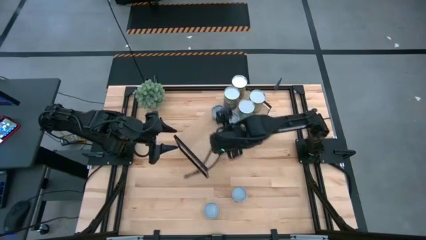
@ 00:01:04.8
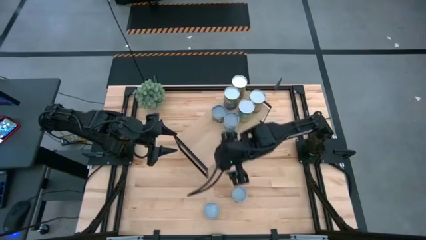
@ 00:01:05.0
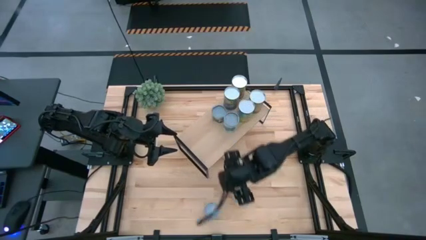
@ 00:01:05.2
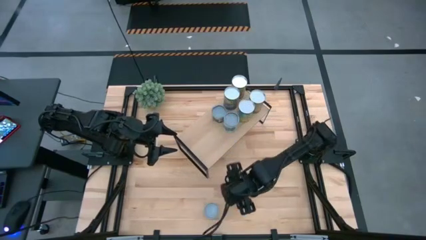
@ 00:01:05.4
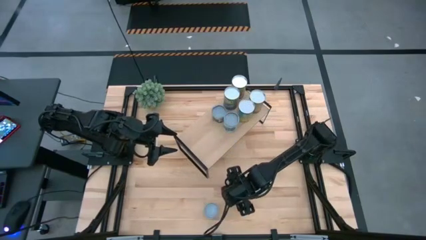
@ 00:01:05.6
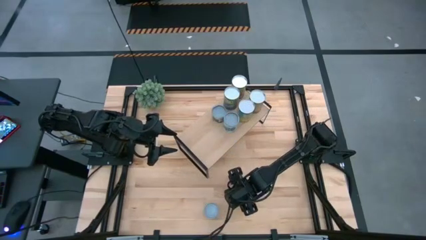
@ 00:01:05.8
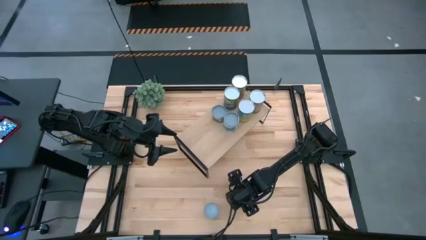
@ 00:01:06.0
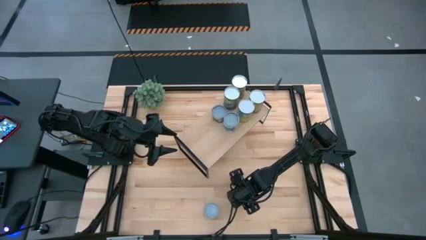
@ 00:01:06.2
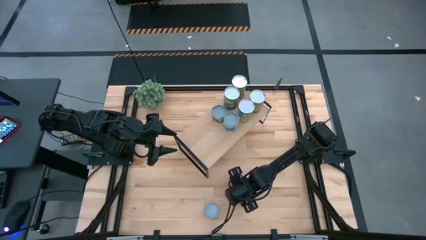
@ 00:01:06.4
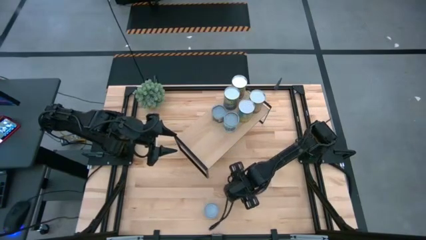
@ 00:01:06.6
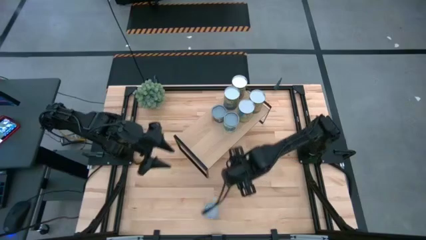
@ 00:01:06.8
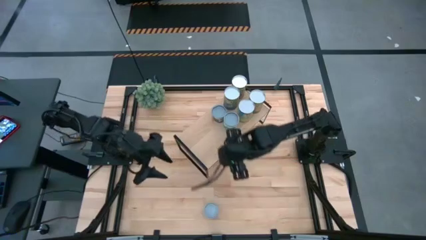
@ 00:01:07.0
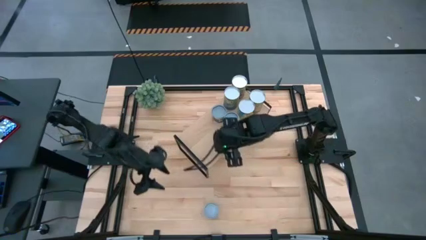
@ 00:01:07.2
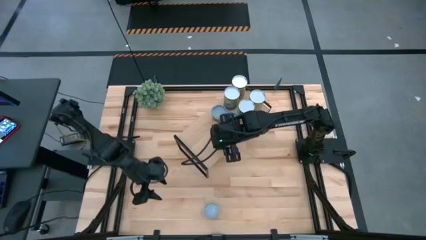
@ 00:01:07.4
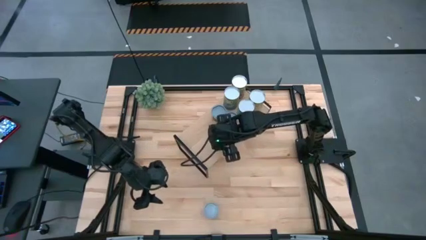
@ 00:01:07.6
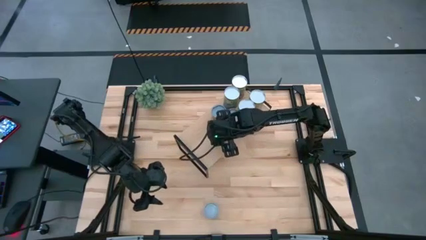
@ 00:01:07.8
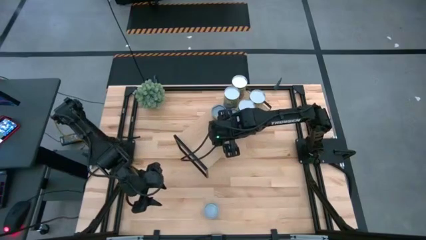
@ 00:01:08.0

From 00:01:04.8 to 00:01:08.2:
Task: Pick and place cans onto a shelf
Put the canned diced tomatoes on the shelf

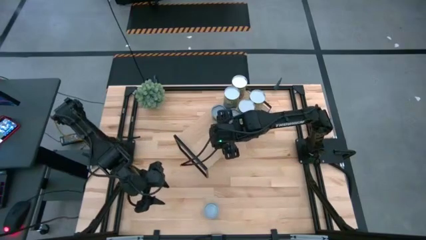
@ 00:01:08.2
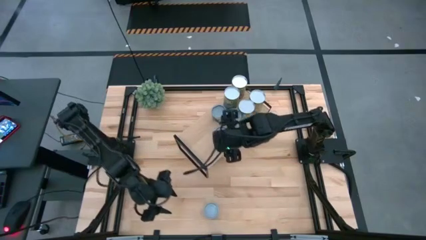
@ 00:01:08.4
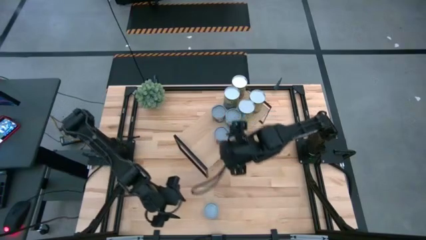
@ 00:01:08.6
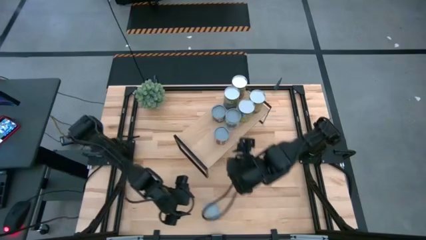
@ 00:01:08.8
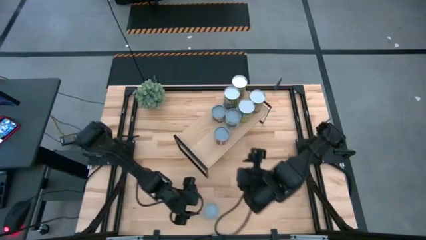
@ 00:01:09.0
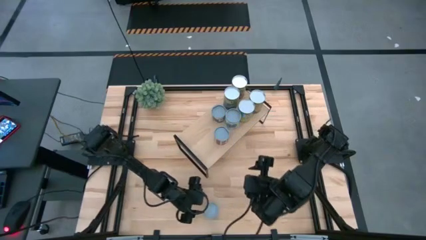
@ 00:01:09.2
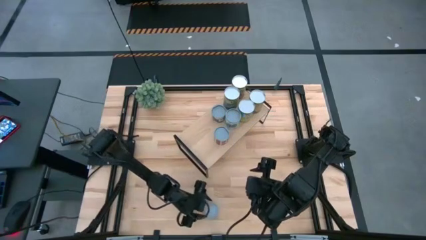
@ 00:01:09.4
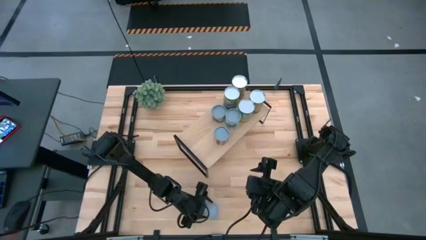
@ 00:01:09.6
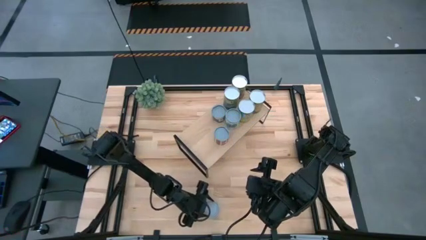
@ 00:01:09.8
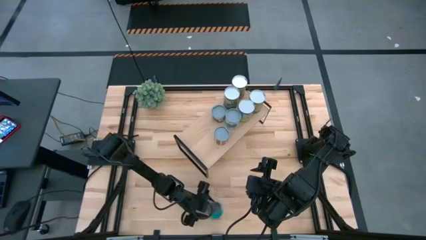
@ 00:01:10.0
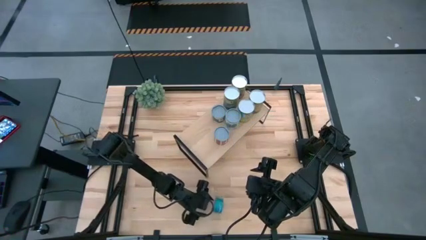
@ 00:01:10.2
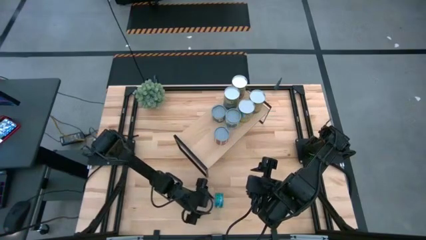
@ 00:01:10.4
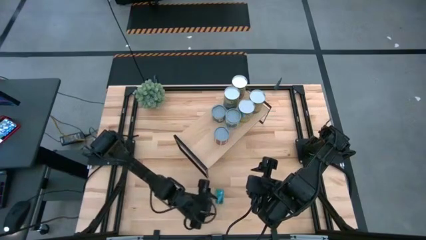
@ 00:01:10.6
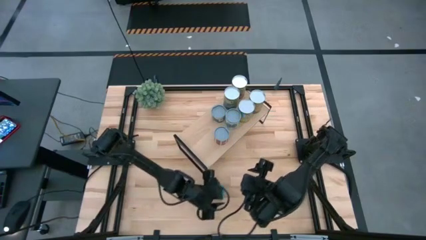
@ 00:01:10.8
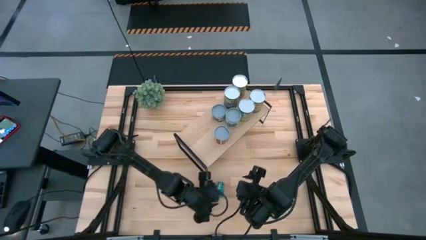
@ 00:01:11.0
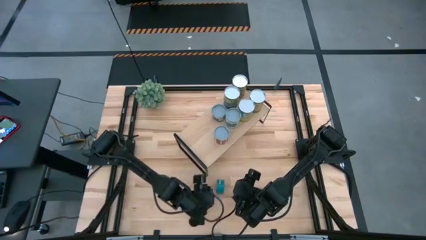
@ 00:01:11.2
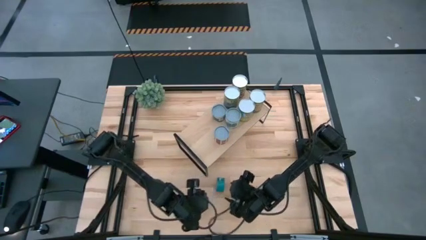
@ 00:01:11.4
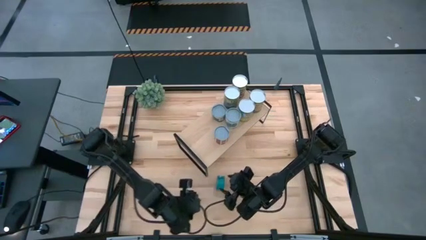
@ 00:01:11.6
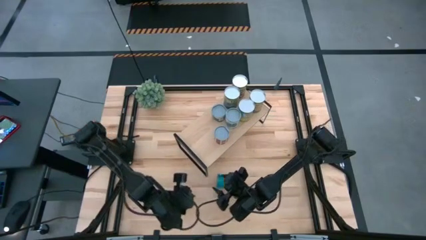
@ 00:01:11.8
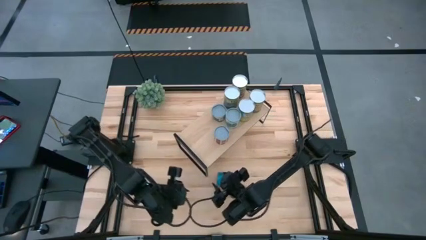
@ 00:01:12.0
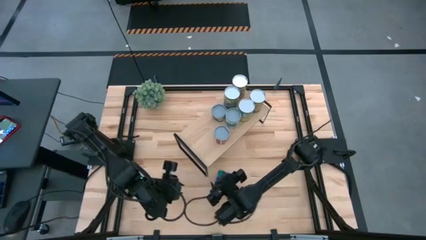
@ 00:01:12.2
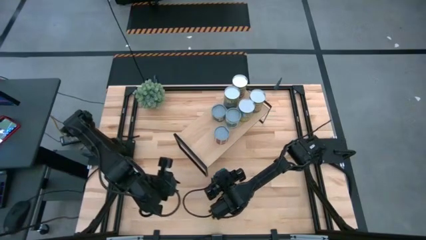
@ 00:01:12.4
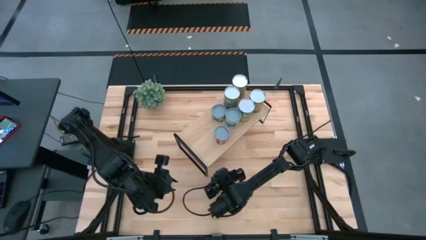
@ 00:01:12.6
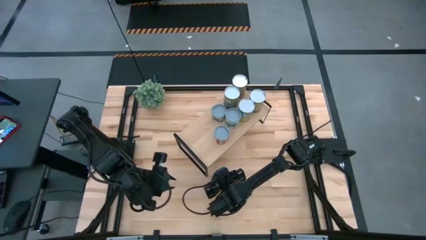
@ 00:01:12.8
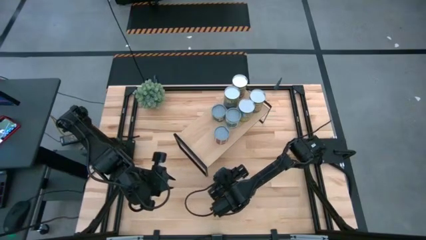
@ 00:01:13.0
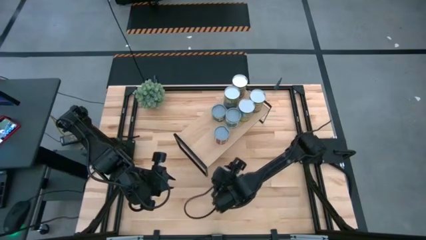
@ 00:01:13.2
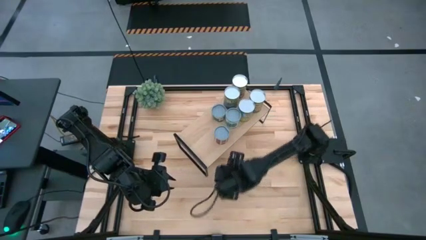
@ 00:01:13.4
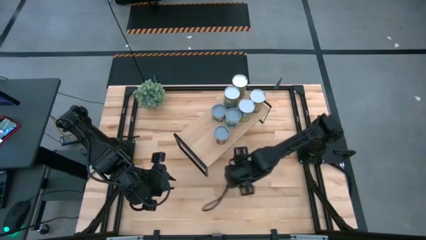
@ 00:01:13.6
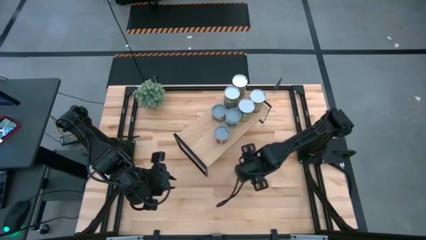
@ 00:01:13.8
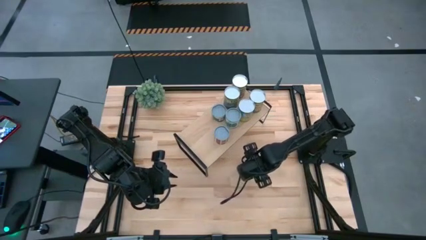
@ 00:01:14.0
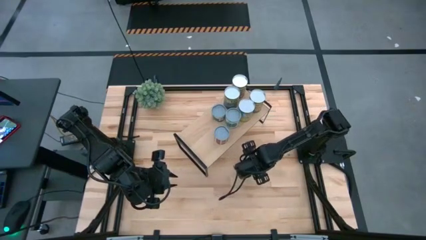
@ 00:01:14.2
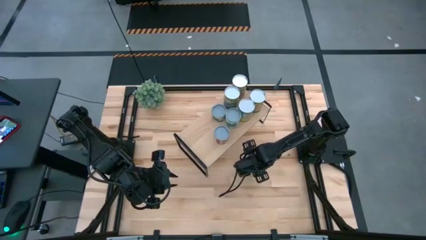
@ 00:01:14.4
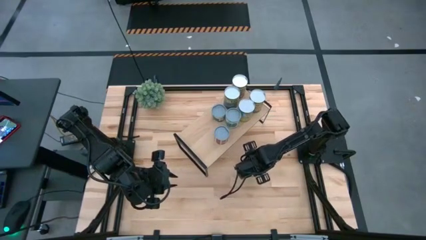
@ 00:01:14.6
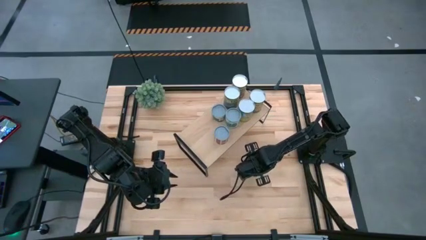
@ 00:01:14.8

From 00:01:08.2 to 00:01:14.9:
Put the canned tuna on the shelf

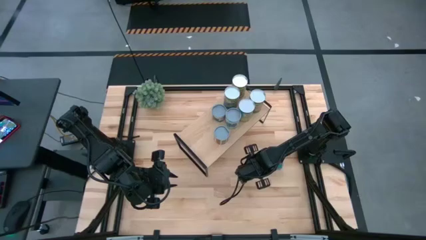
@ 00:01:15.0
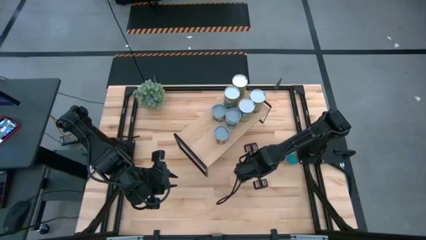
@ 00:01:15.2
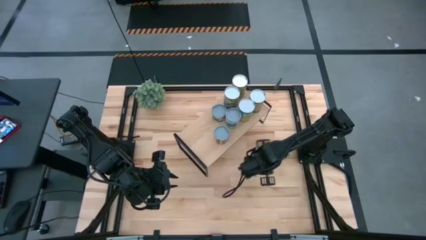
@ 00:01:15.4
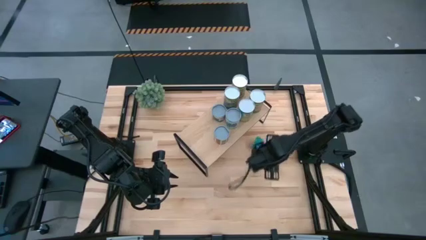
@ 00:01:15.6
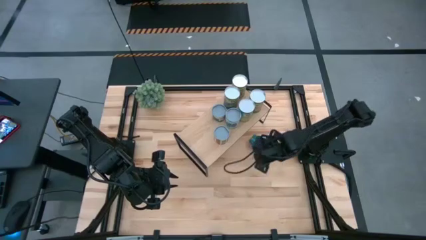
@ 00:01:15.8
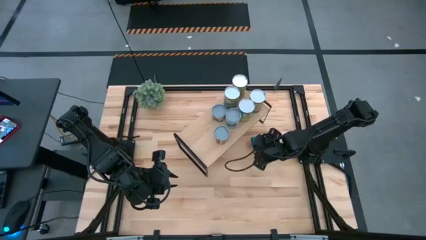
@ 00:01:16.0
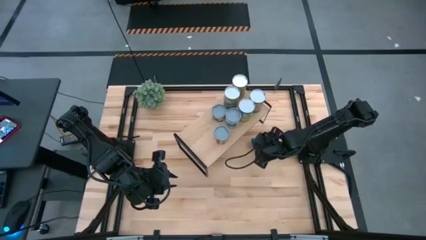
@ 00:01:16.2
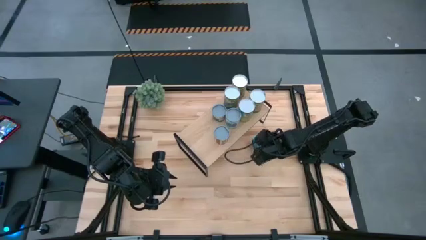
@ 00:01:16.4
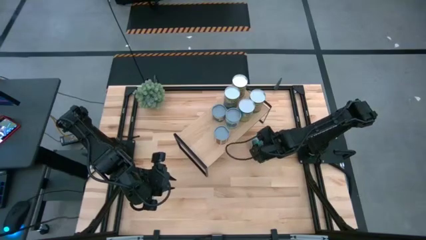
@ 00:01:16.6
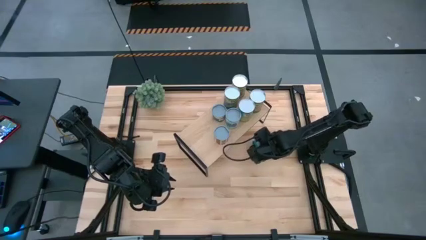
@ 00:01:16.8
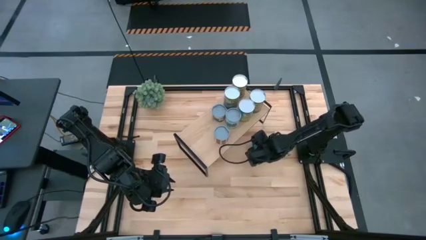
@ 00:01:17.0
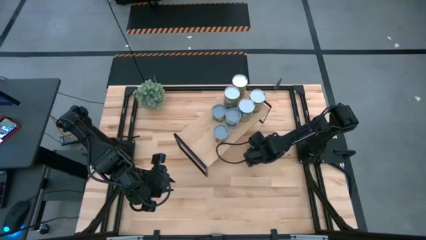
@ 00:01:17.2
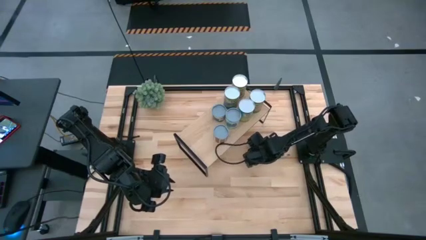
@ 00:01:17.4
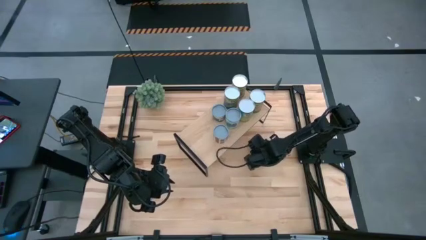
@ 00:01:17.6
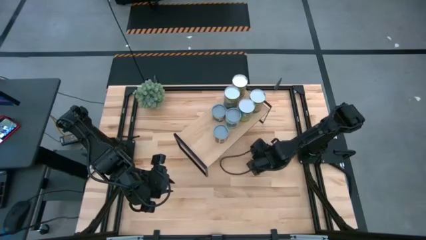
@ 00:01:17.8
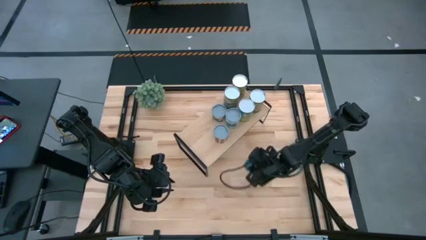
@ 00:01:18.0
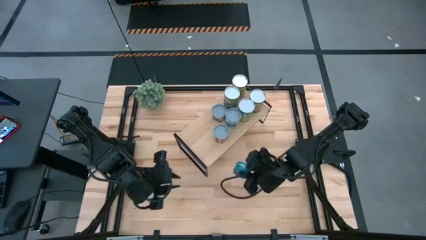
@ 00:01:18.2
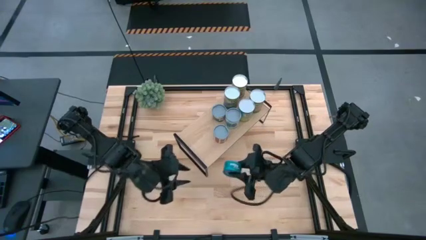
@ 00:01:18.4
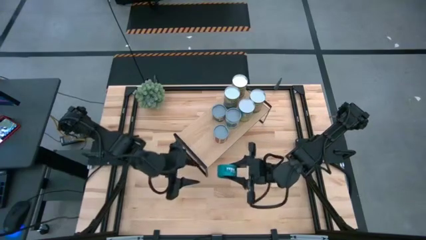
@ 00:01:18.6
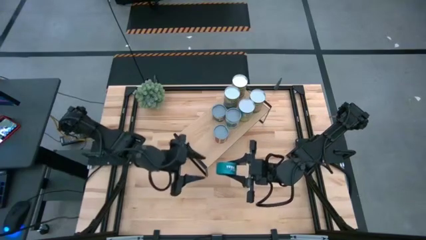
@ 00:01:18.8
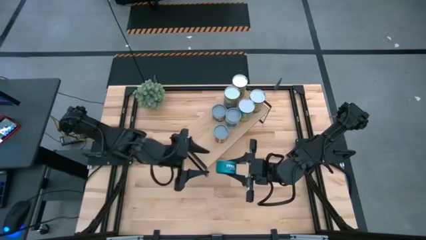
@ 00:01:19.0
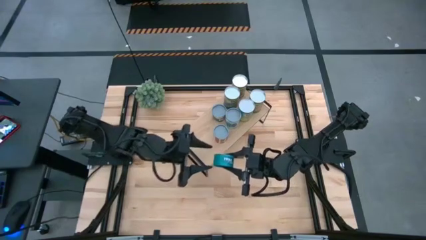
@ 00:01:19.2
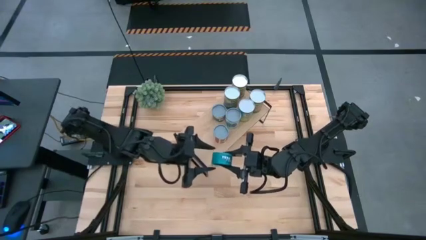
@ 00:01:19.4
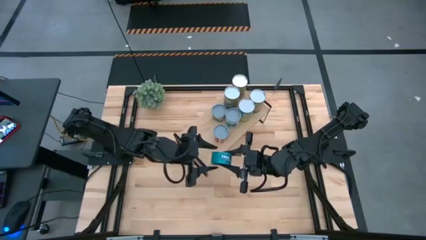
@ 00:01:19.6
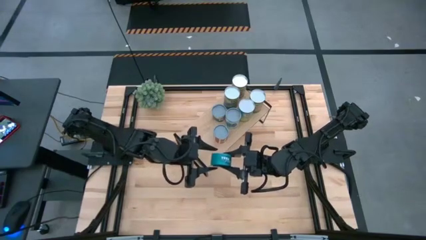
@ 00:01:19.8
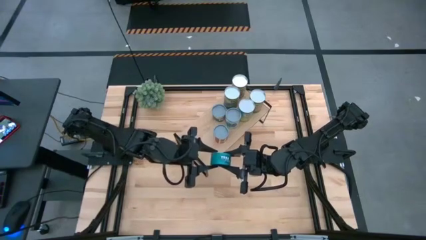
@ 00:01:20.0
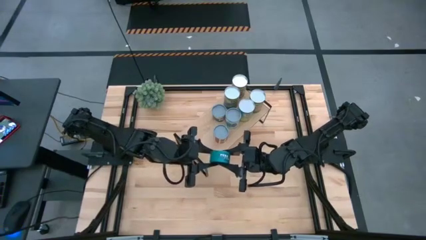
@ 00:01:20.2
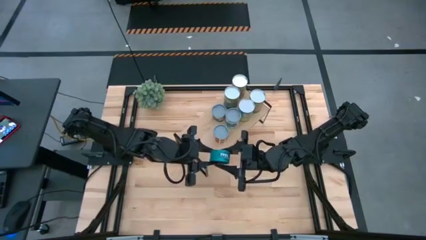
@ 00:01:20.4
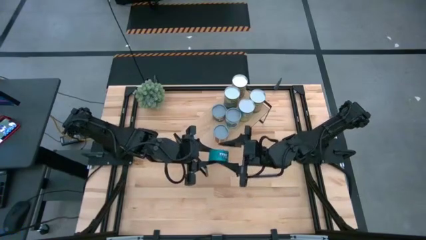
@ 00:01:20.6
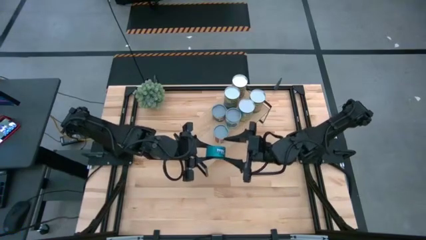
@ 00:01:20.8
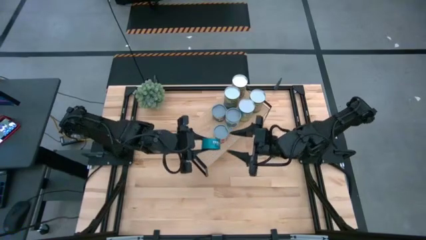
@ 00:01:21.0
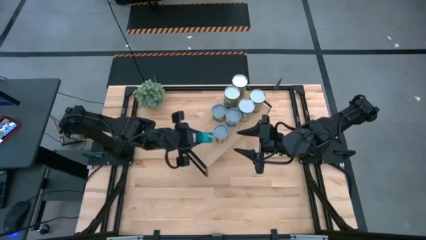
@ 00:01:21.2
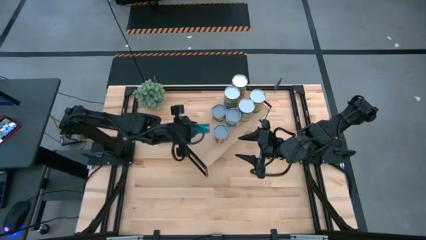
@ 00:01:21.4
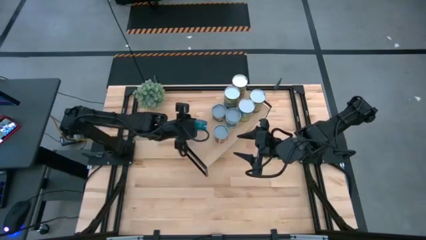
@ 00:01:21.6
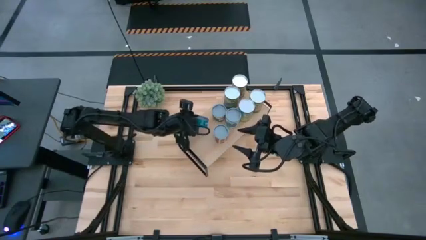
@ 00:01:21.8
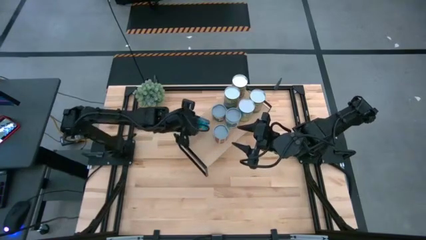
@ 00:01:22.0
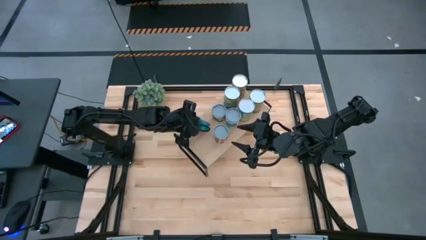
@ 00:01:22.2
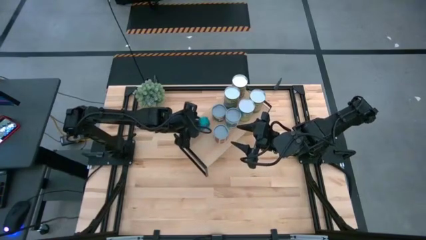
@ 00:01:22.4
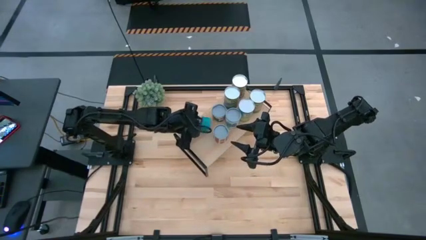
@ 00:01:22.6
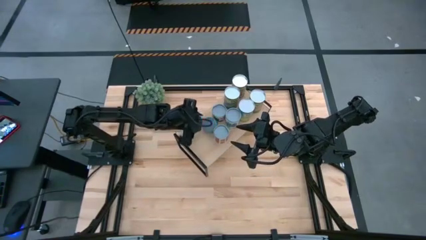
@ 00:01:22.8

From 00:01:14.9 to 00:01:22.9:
Put the canned tuna on the shelf
